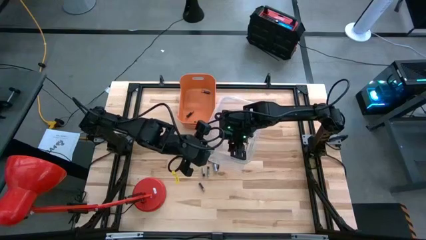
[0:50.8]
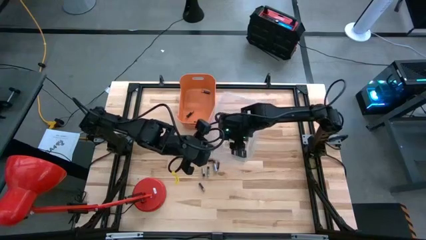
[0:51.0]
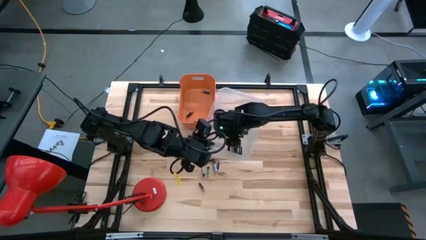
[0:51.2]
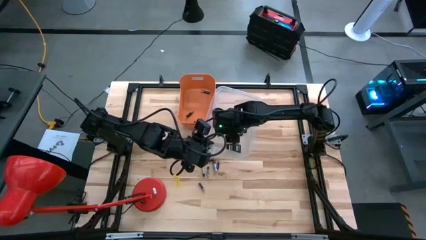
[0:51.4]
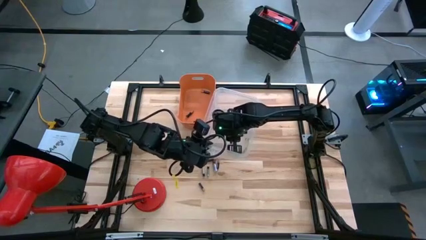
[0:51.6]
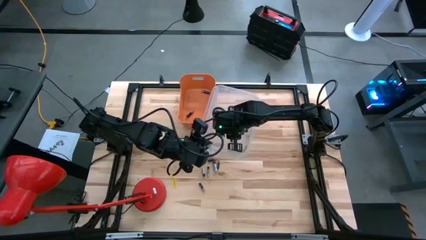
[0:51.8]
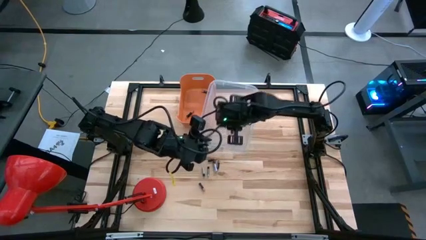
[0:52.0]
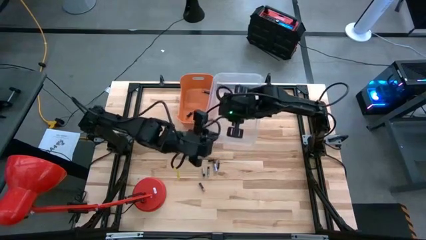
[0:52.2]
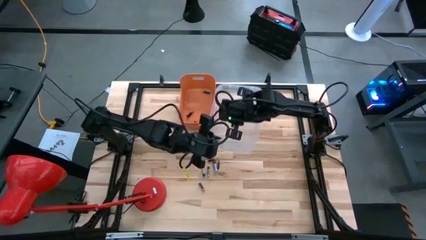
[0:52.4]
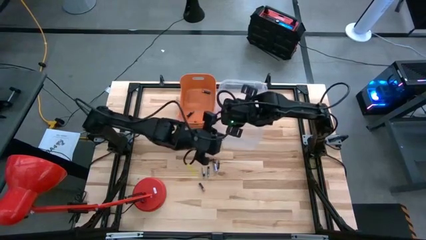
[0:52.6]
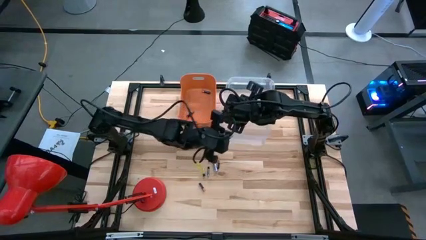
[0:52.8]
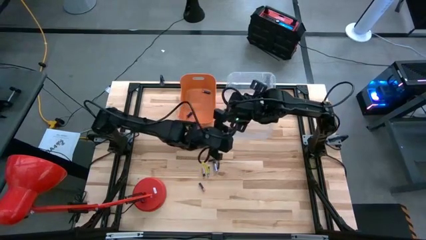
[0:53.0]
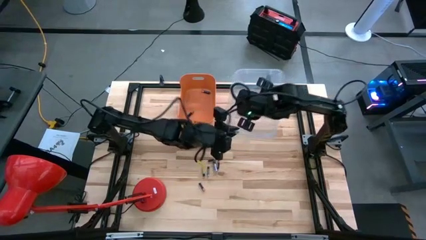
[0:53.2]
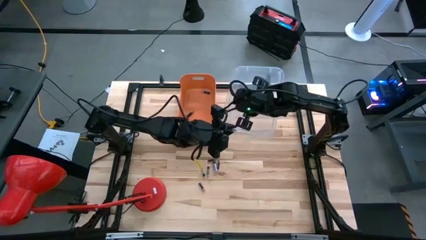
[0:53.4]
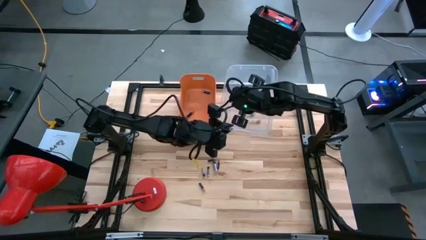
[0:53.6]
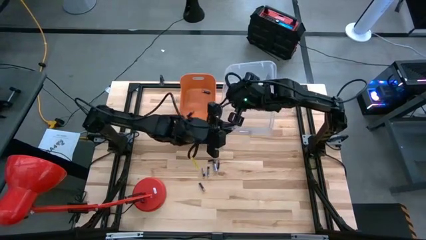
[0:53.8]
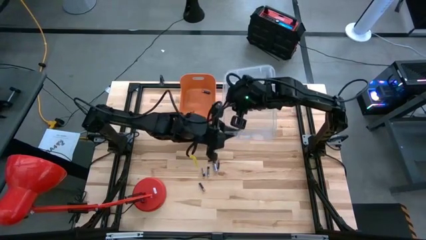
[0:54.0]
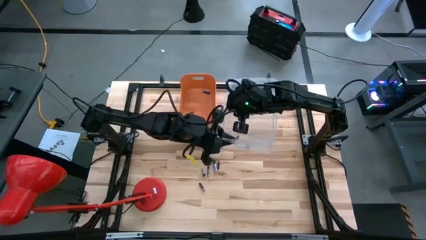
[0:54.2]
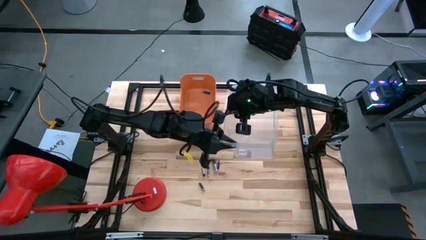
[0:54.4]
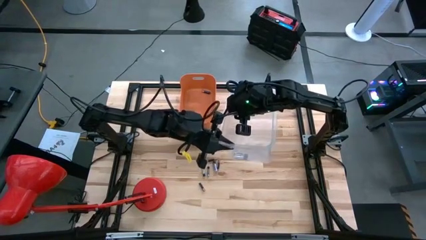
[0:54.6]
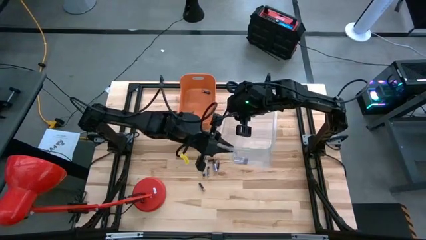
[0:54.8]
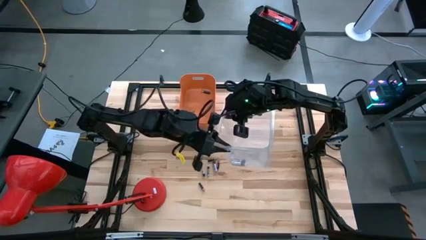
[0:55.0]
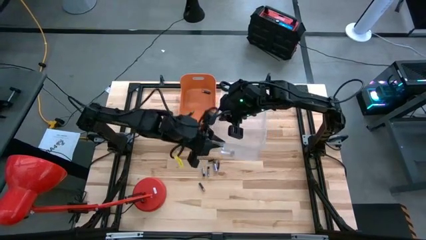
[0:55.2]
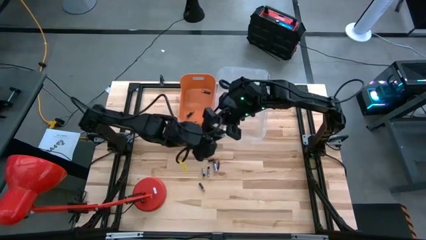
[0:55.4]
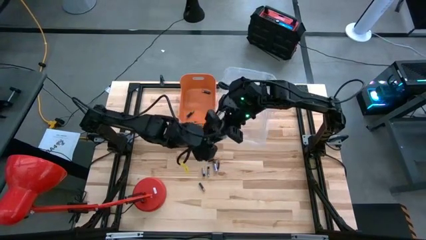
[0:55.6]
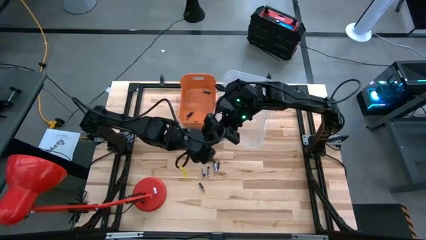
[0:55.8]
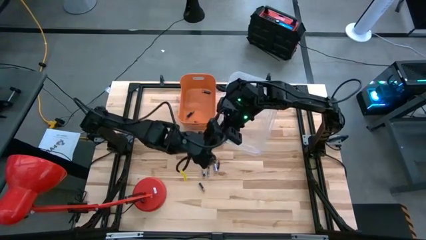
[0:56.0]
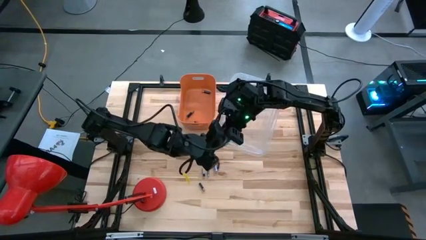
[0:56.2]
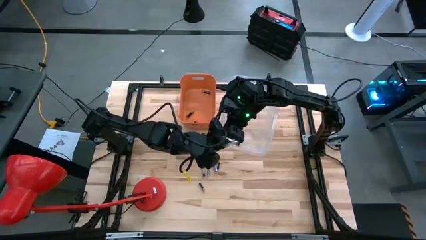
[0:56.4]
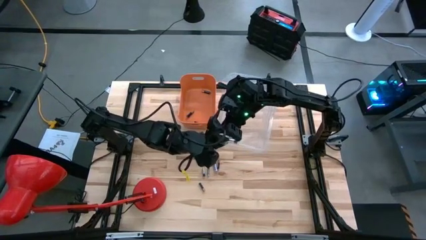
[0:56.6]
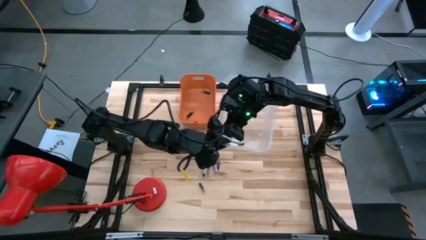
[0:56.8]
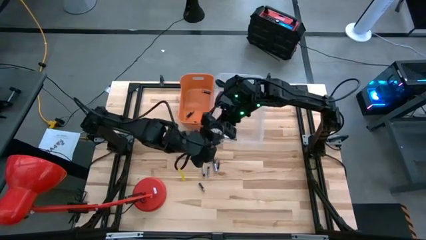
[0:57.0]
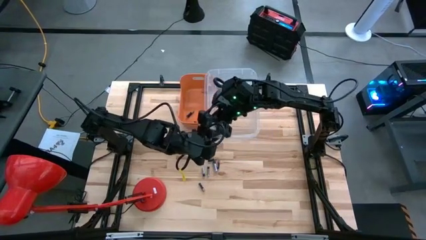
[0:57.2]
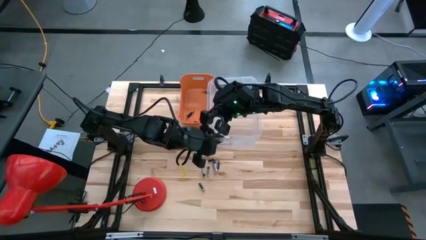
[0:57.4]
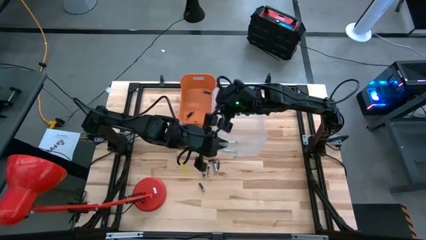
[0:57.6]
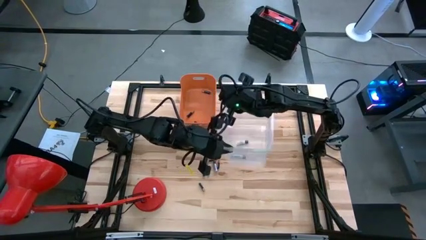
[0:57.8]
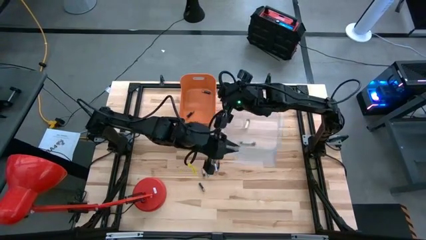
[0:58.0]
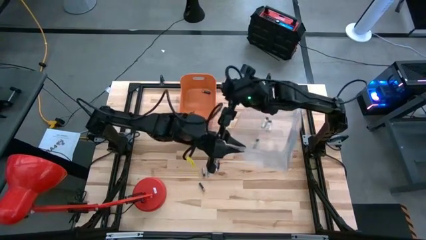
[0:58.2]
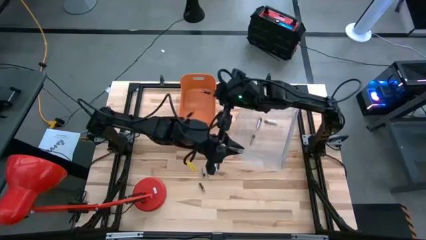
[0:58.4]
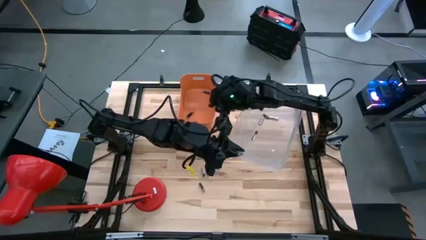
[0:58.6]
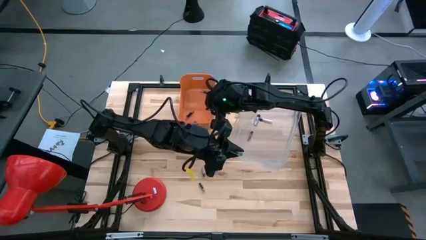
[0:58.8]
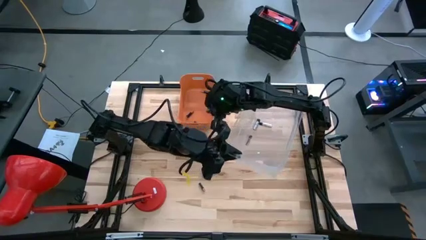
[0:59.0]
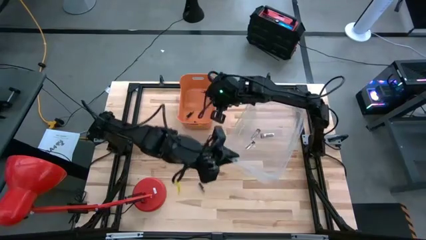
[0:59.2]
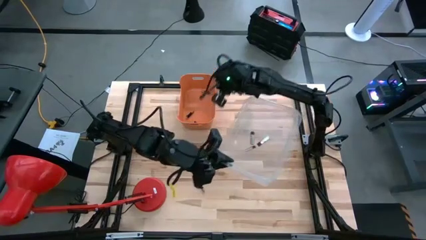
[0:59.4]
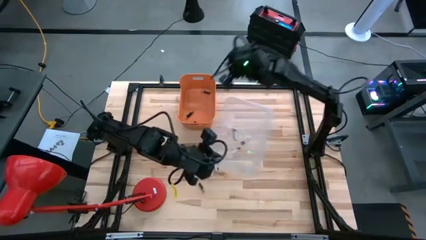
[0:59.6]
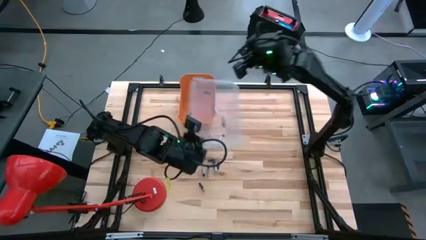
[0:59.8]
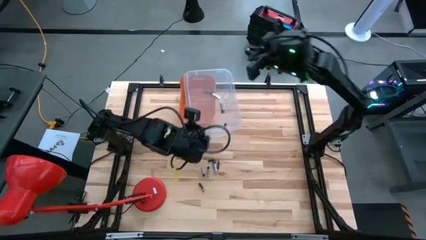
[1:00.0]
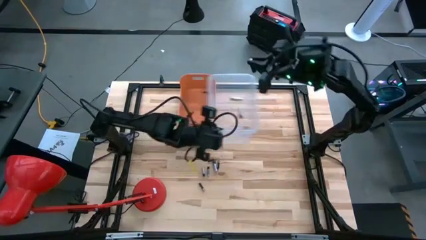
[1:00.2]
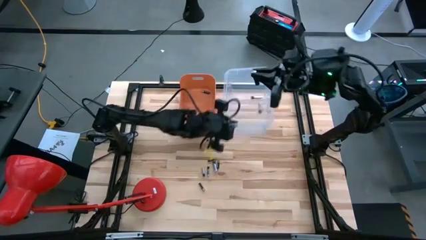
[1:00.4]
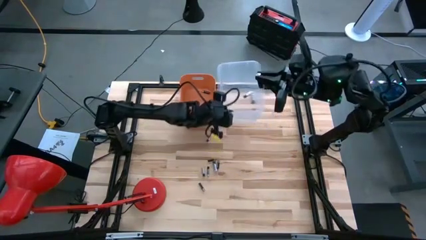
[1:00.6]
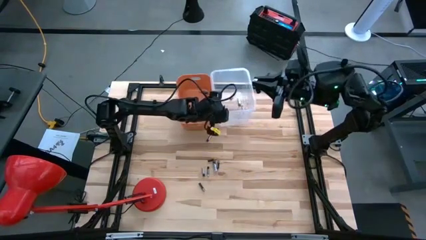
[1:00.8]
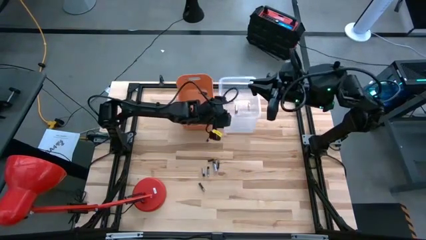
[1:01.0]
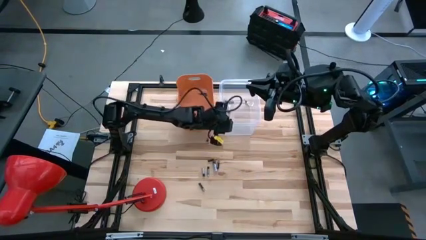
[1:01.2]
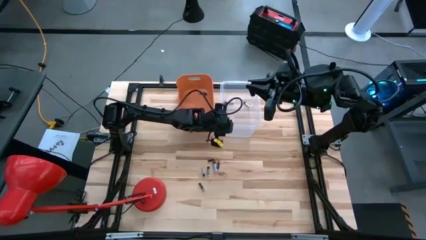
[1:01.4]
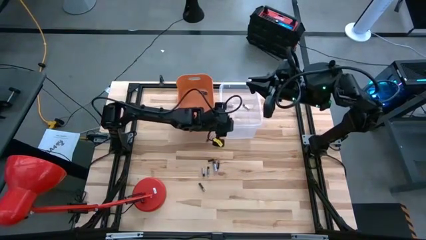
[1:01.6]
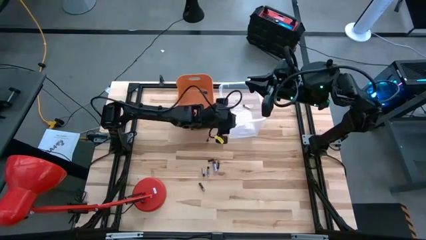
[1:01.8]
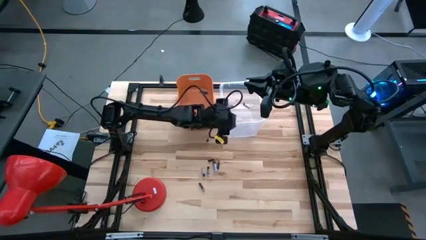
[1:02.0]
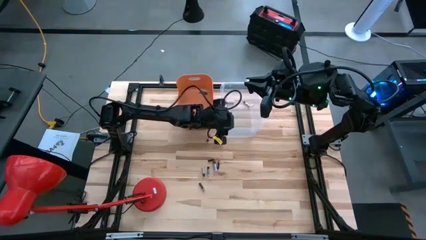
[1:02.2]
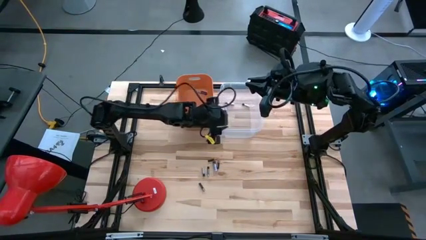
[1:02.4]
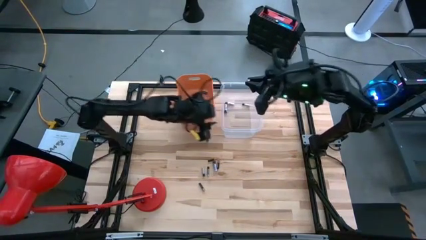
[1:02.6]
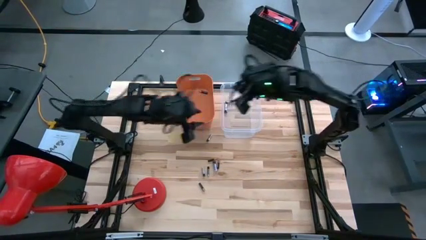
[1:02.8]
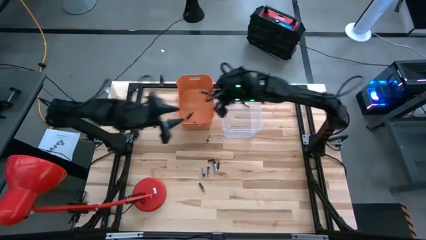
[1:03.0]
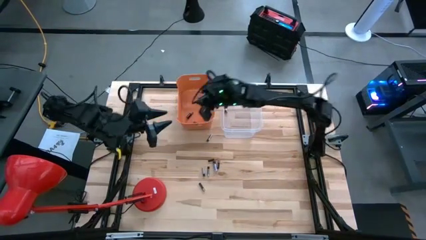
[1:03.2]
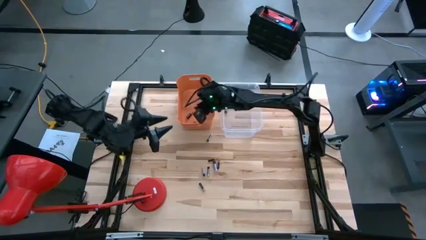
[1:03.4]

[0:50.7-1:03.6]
Task: Sort batteries
Put the brown battery into the orange bin

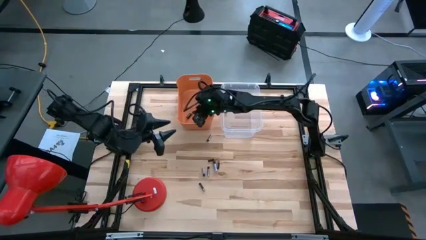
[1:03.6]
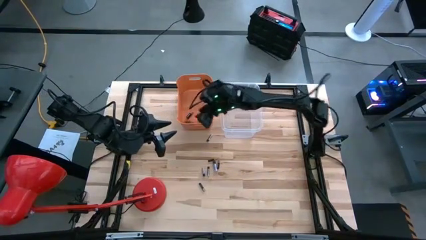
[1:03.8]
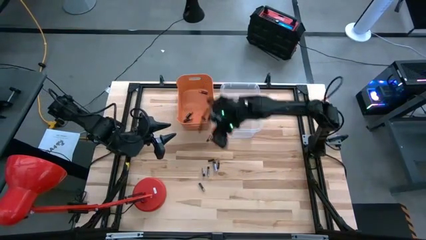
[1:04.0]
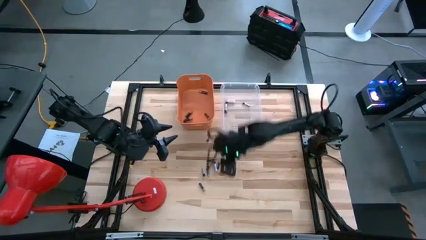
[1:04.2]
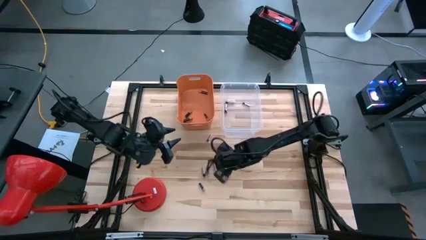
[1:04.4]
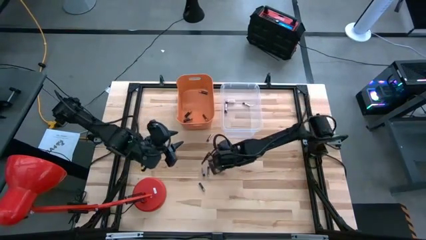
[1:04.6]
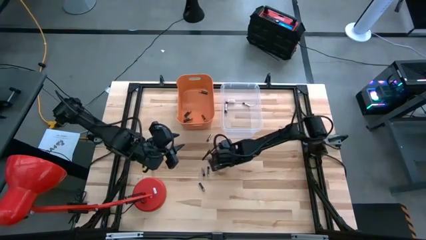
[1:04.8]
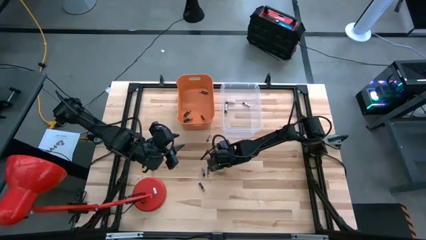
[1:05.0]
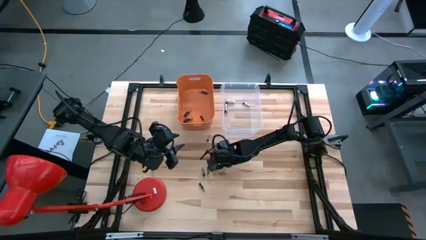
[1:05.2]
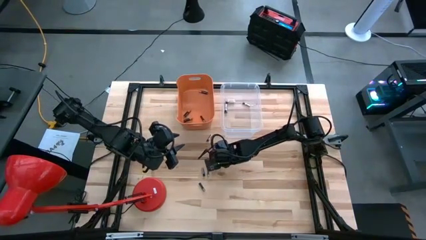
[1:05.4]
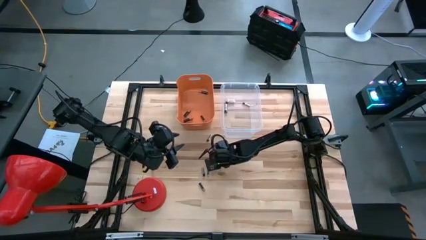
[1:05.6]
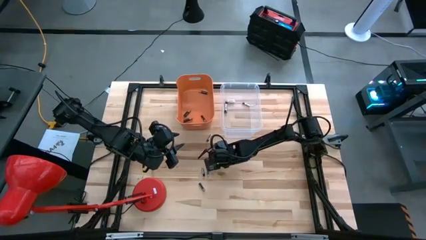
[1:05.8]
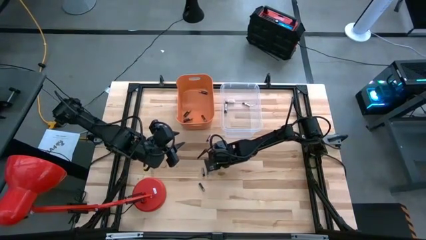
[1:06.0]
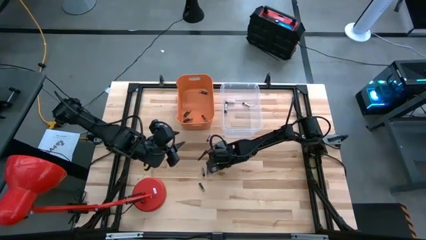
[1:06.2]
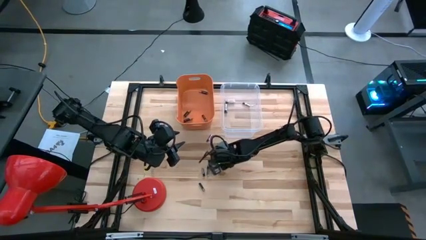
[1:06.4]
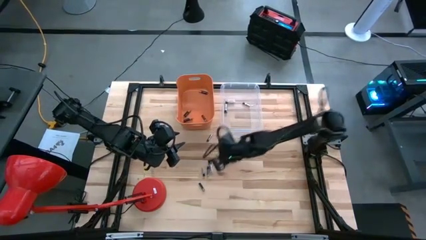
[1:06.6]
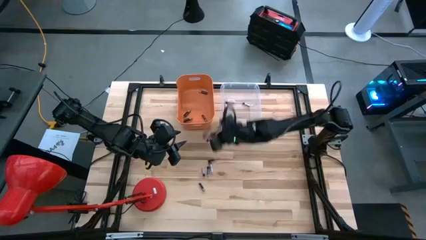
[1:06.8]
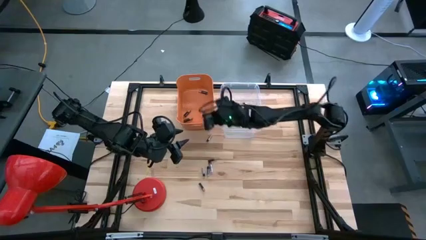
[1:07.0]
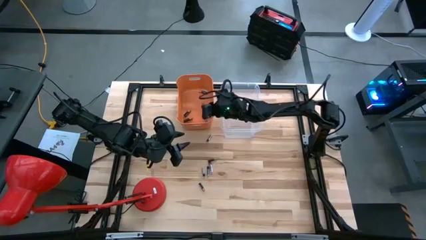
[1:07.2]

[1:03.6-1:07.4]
Put the brown battery into the orange bin

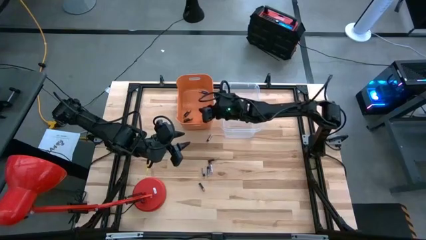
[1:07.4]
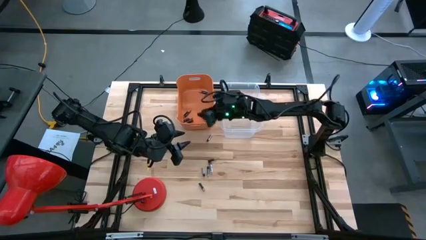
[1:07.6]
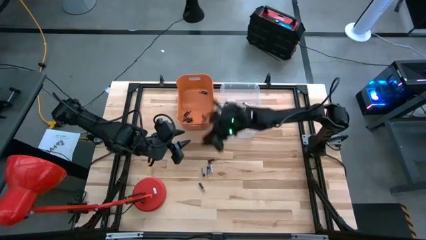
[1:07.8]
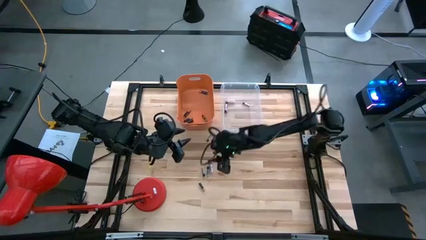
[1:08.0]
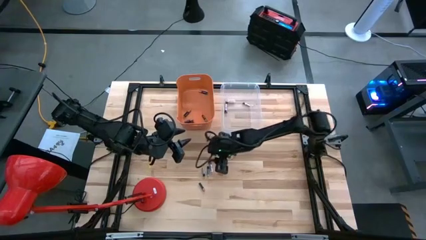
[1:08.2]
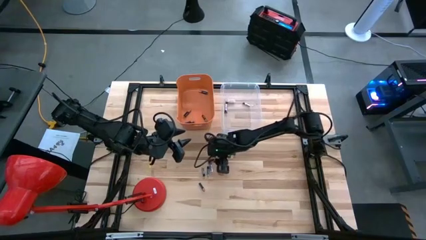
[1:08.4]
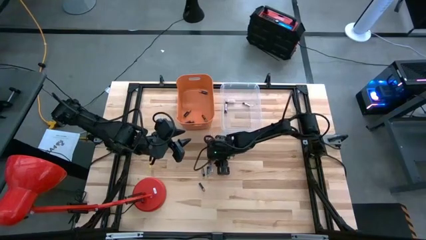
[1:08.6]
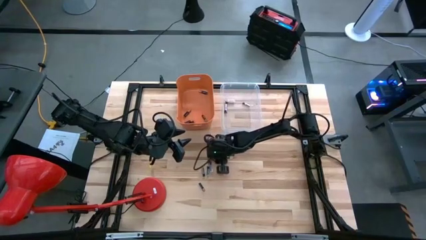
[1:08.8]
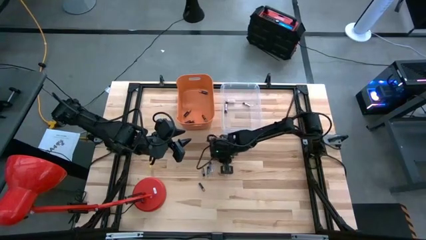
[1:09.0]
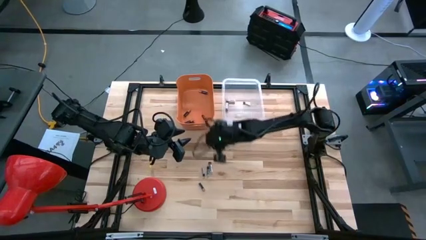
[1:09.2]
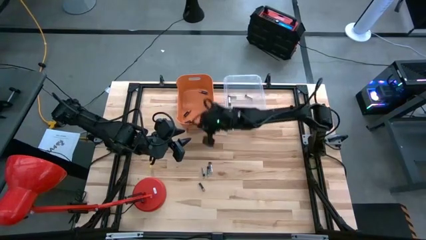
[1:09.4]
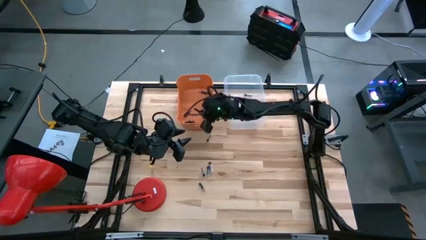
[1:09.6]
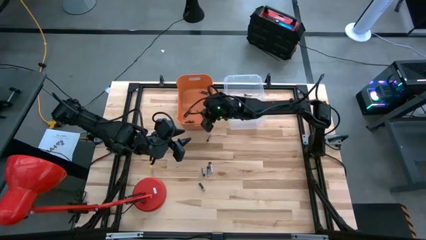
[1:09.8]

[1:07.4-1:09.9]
Put the brown battery into the orange bin
